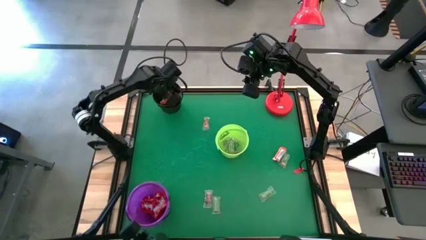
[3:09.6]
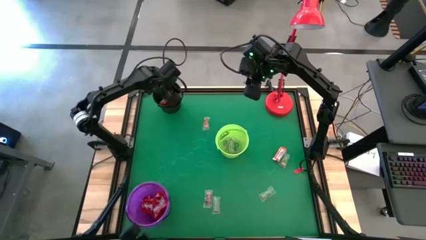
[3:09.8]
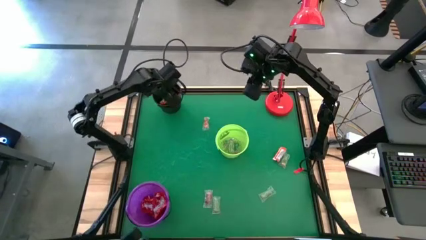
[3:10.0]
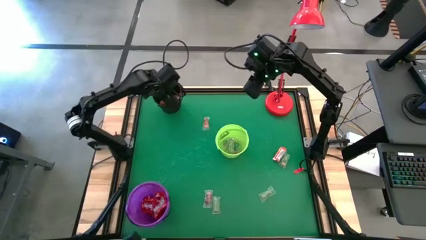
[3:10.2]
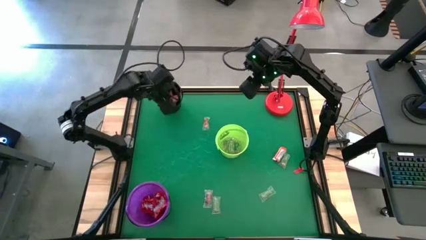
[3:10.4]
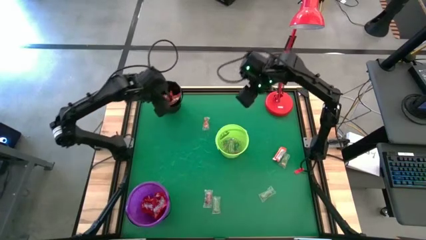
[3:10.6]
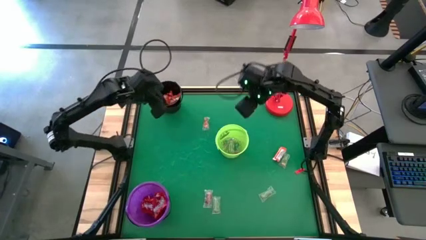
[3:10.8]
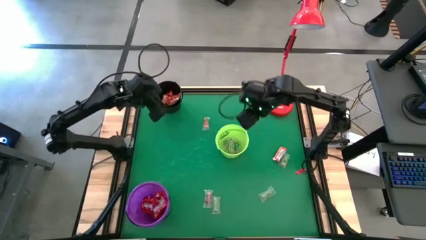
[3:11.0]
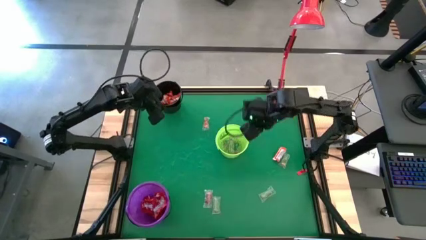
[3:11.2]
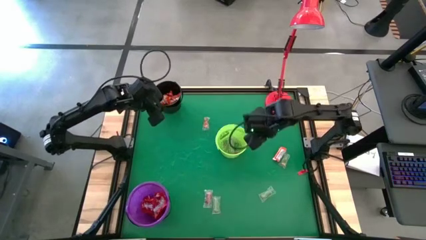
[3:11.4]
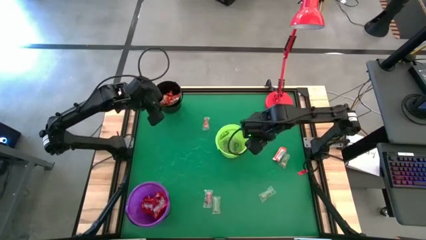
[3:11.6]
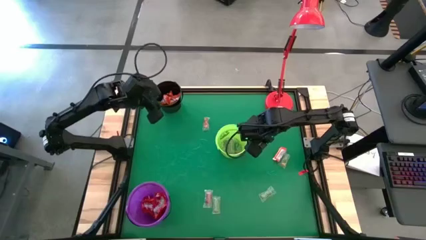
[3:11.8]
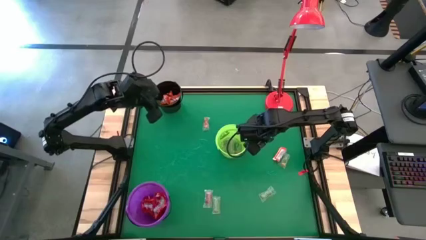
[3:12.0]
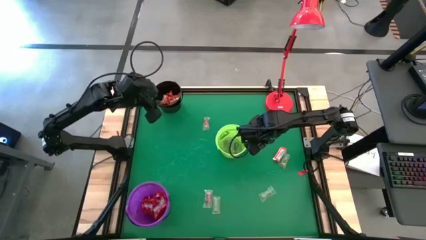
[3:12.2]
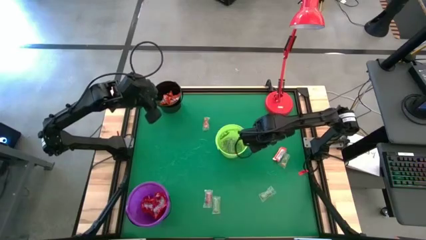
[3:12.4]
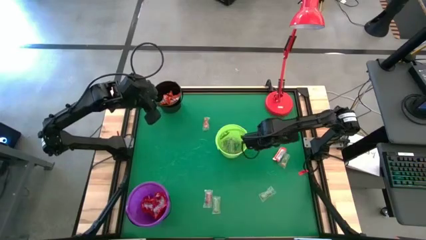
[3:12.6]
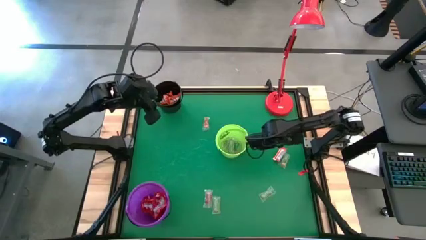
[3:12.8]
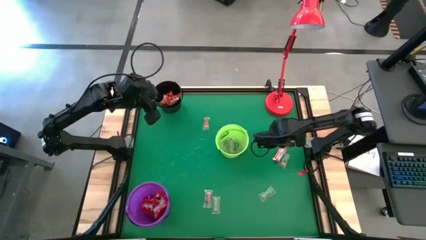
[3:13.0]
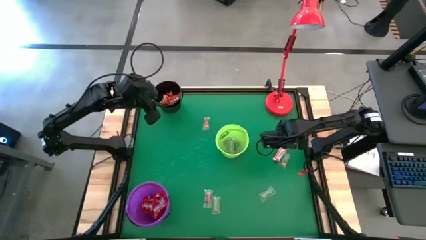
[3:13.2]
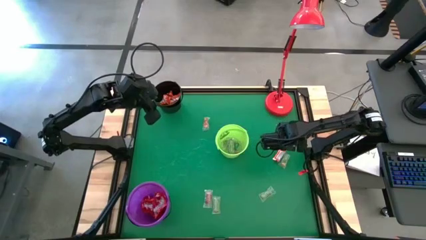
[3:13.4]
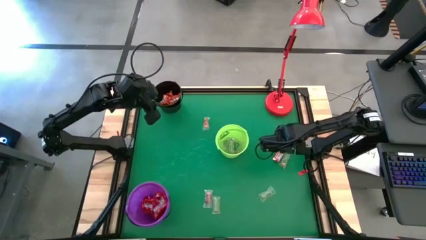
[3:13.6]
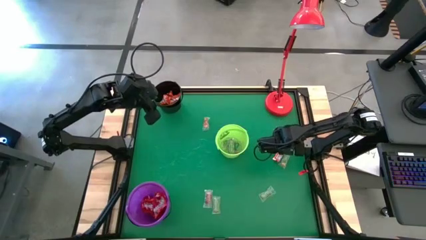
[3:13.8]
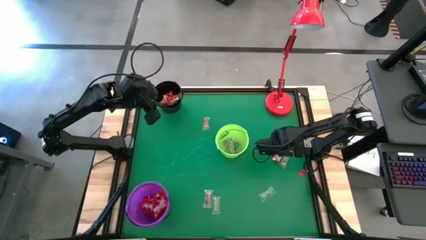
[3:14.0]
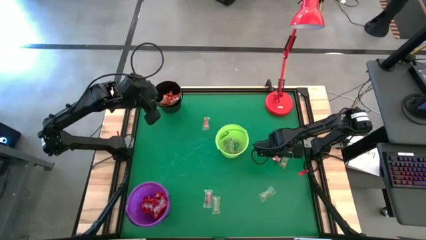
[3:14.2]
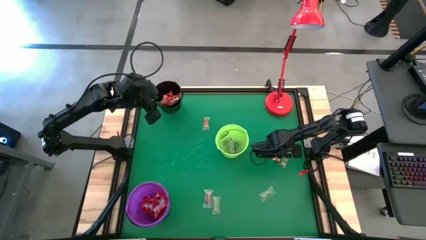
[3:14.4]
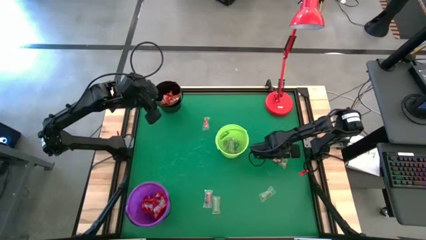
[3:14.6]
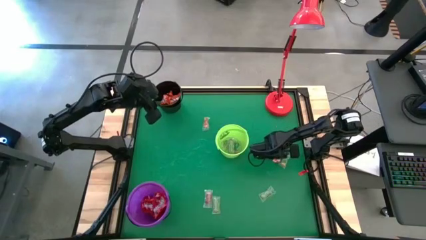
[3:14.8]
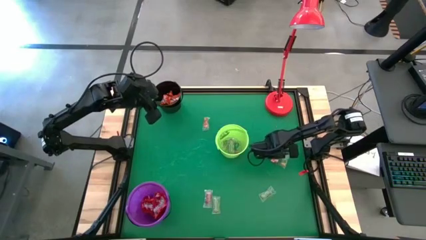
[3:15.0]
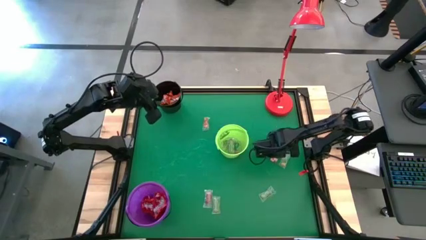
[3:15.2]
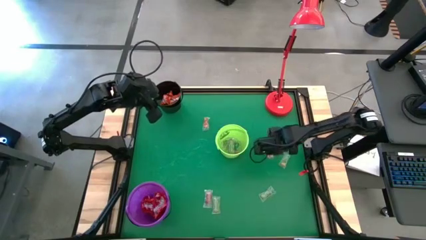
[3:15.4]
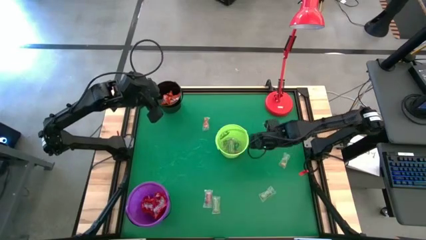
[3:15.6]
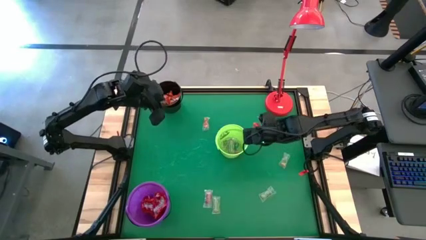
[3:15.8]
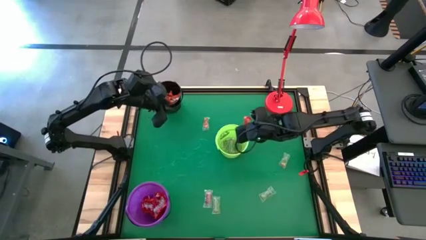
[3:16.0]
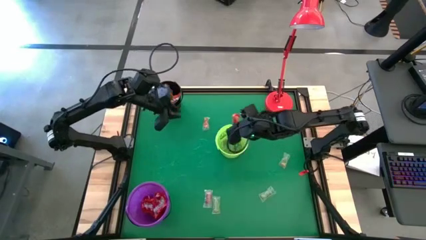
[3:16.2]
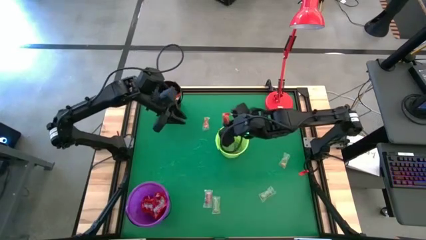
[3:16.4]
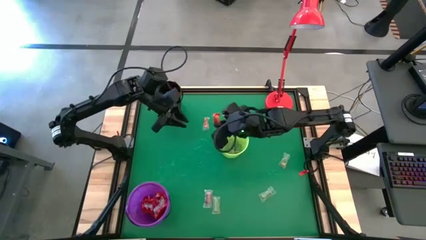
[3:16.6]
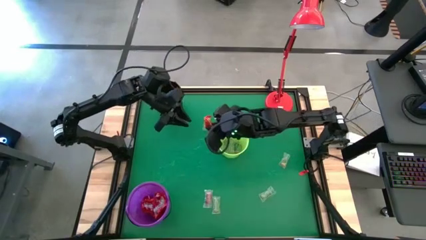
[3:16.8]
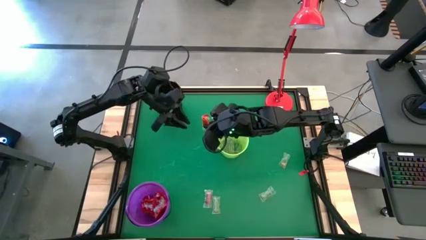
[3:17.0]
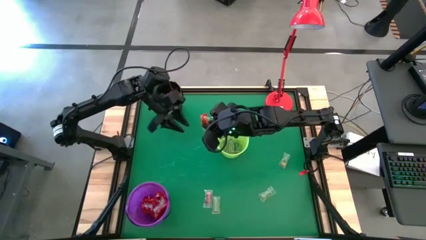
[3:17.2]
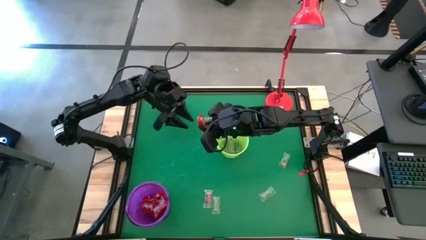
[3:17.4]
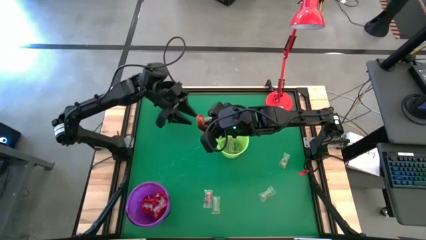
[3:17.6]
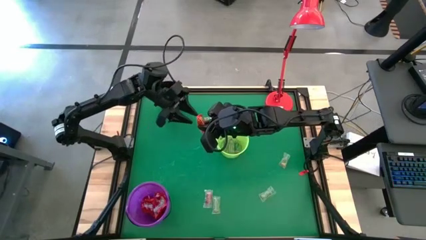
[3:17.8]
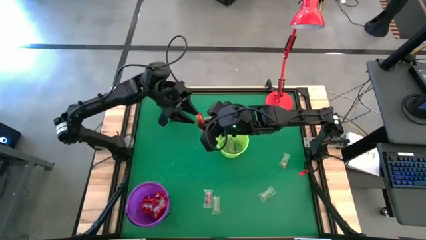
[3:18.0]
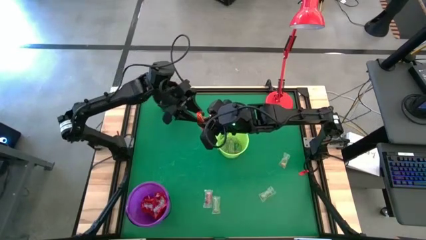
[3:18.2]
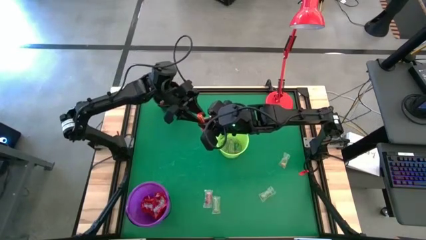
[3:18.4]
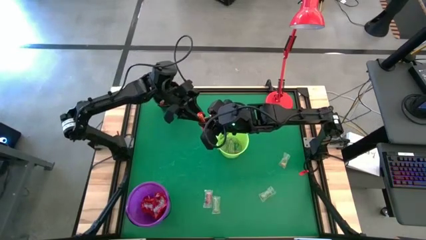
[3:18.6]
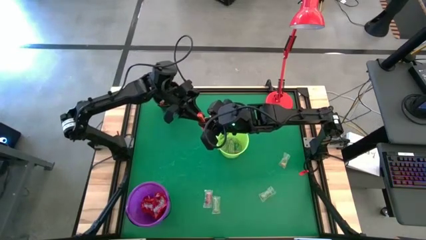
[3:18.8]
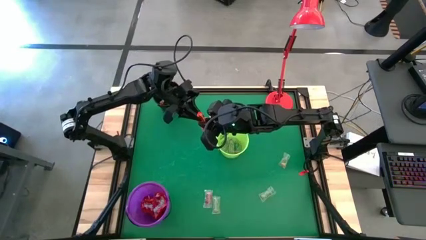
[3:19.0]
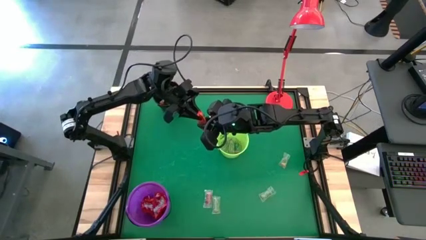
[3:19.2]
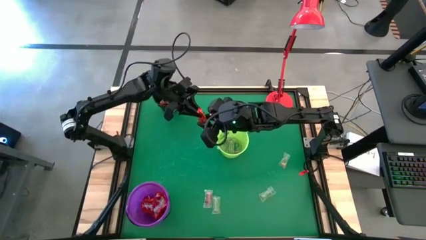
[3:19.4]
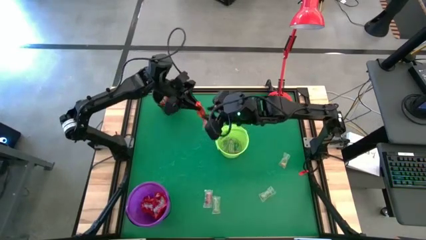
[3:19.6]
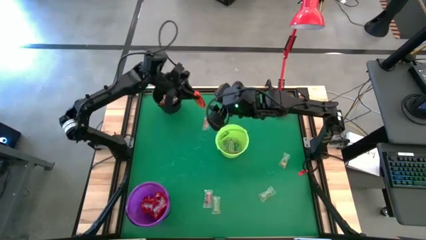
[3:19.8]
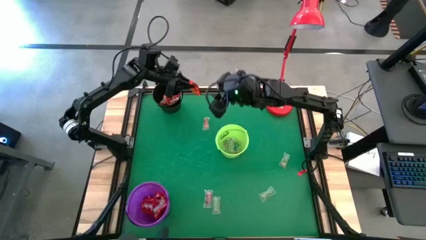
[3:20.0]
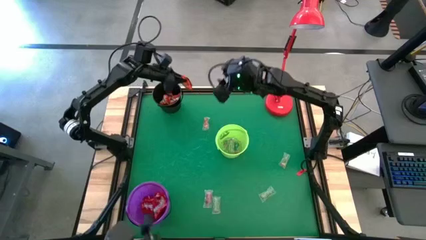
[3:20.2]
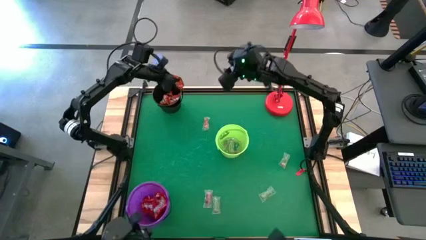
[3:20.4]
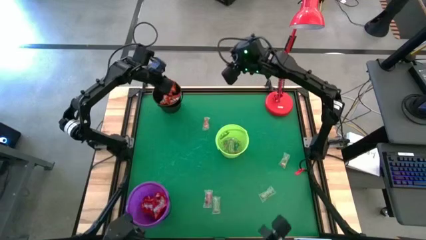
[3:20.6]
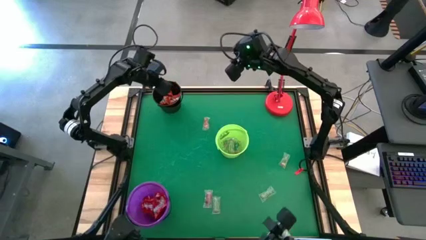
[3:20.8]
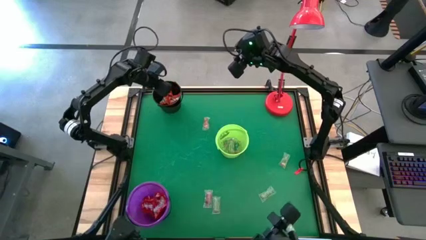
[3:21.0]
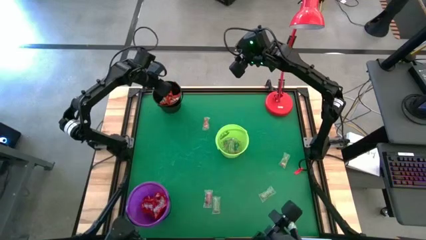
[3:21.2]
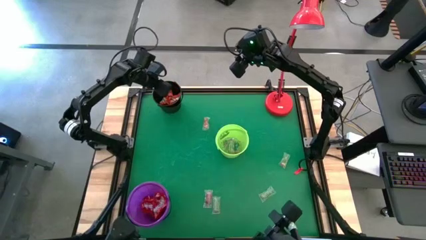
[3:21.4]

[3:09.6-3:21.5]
Task: Sort candy
Put the orange chocolate into the black bucket

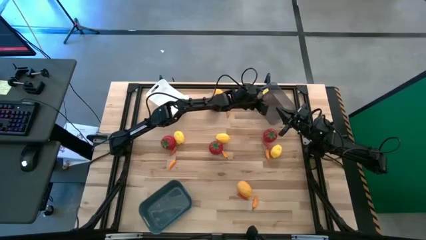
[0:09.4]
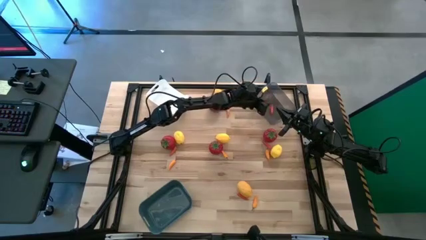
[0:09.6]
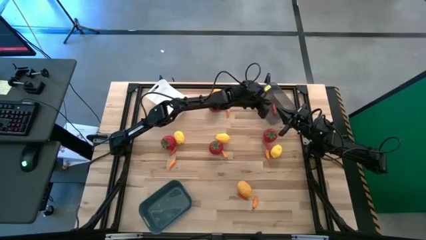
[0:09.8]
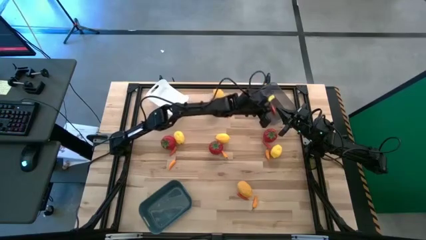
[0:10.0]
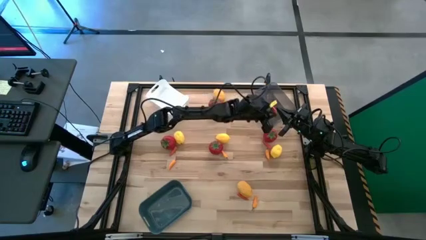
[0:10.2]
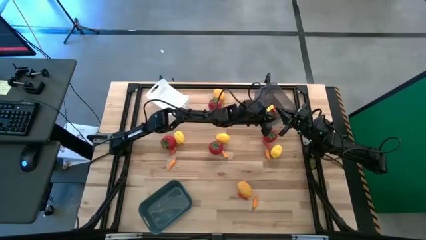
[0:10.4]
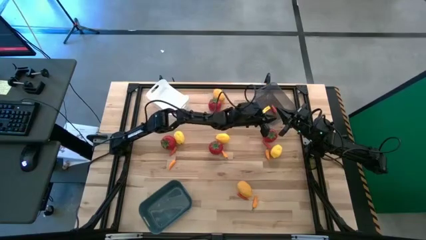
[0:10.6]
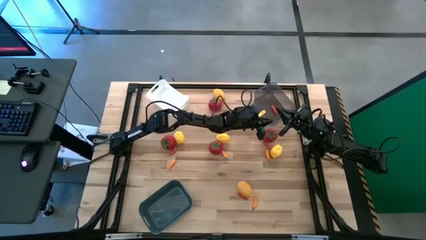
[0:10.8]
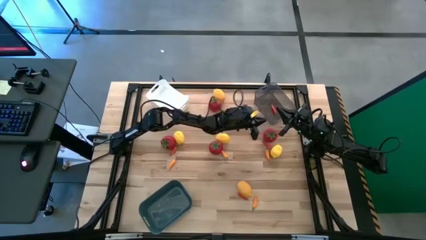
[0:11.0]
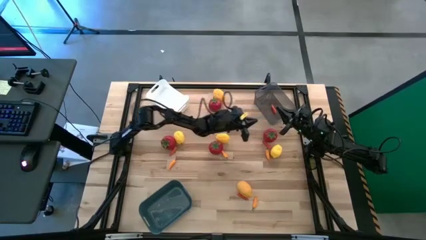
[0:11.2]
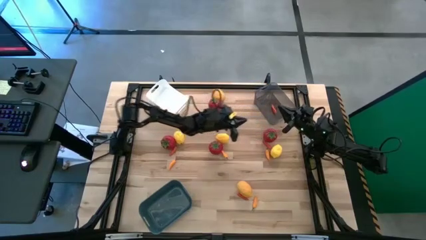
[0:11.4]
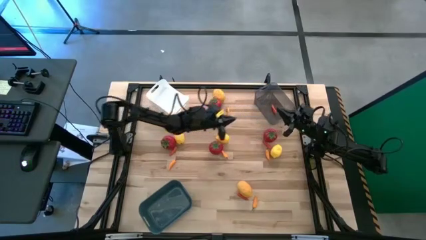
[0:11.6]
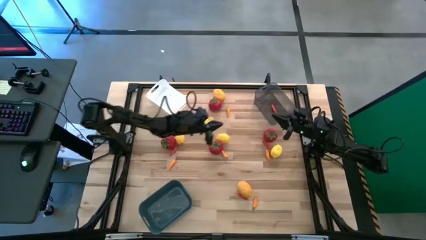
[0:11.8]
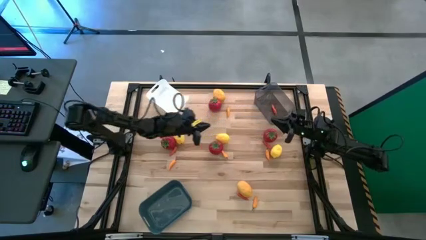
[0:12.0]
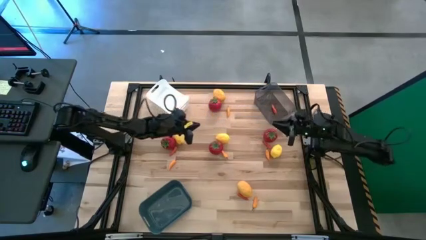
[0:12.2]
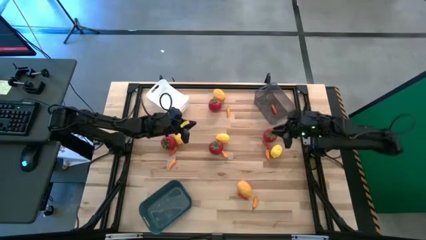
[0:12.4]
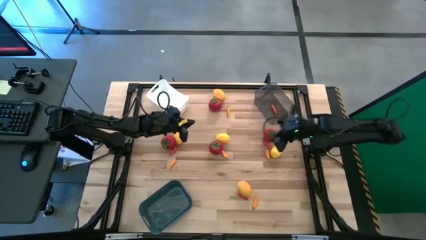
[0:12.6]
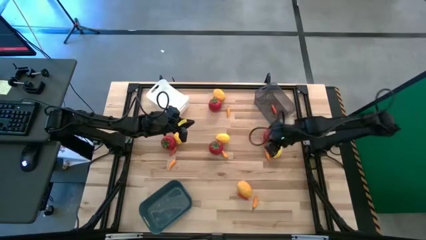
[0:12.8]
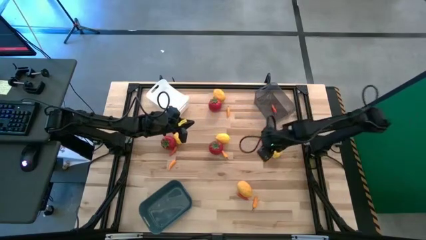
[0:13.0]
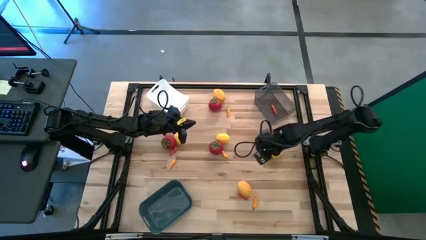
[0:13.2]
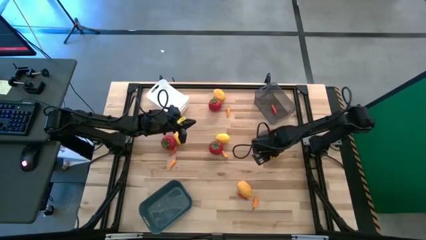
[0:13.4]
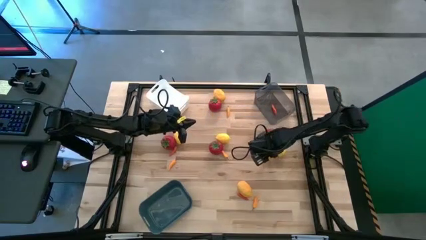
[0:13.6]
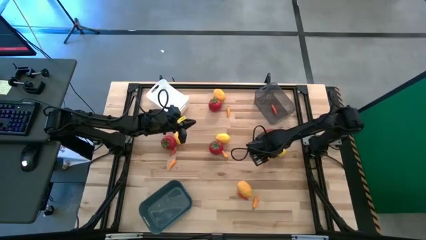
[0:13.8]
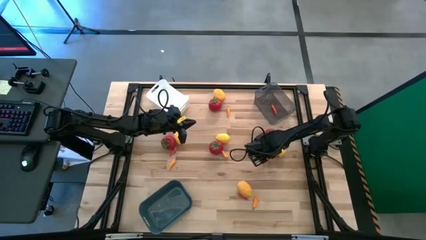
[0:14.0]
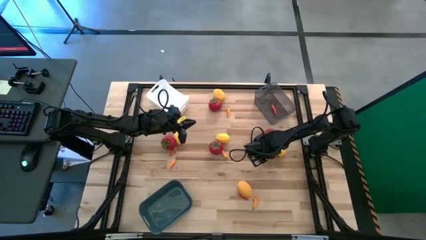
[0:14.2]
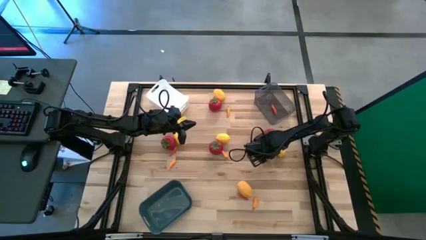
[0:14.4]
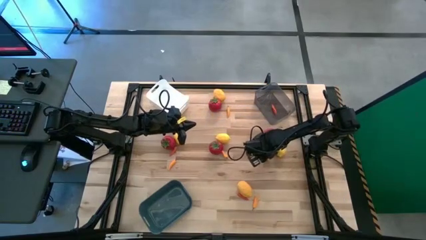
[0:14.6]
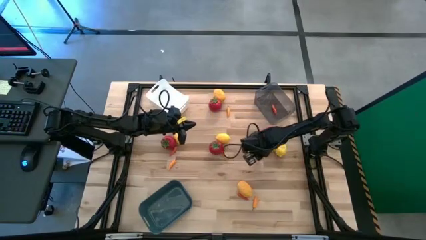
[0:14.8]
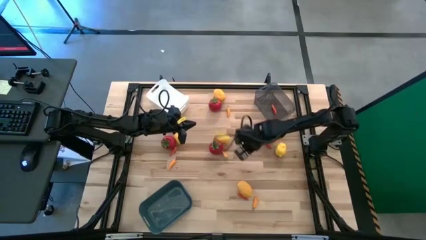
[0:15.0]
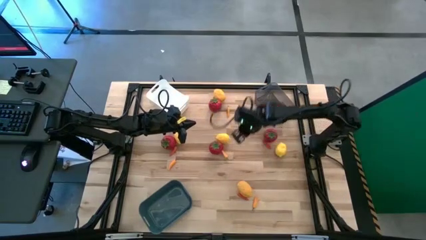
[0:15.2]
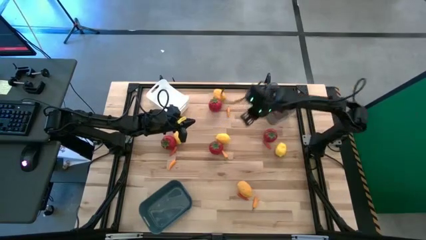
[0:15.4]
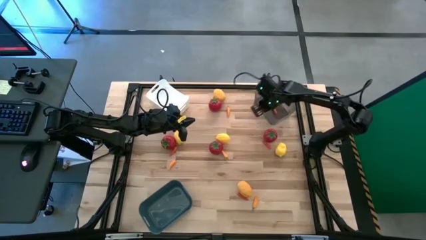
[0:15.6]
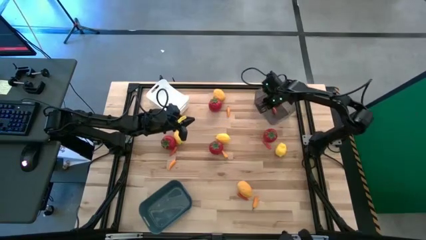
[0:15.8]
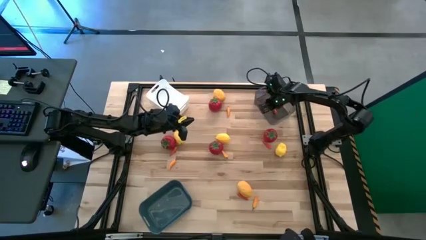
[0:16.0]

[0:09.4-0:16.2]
Task: Sort produce into baskets
Put the orange chili pepper into the black transparent bin
